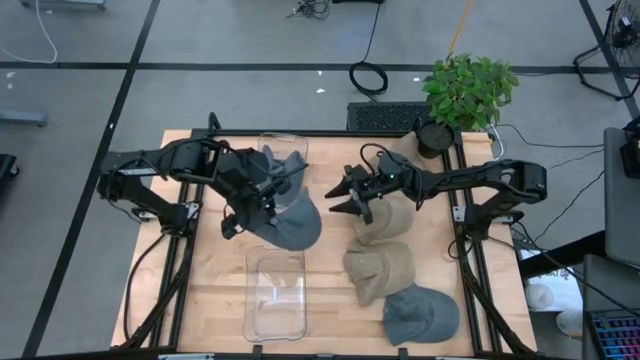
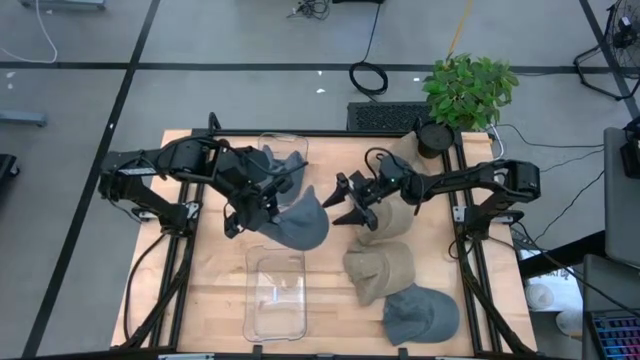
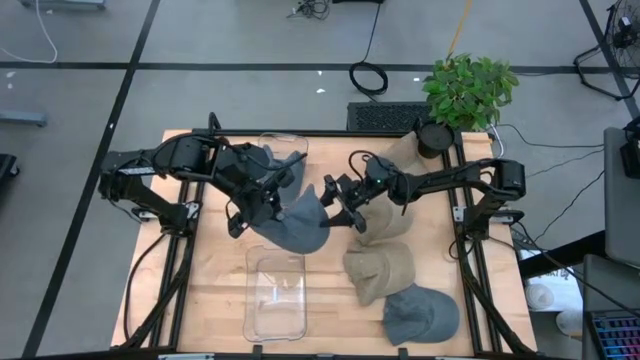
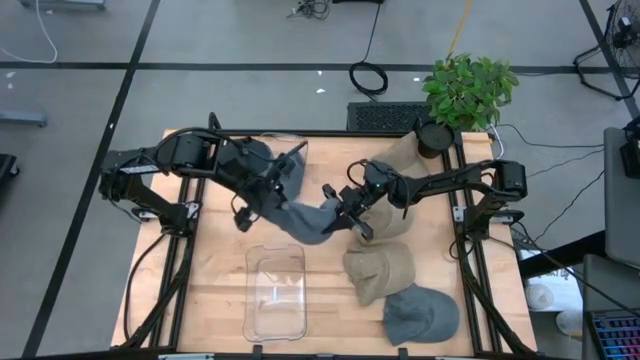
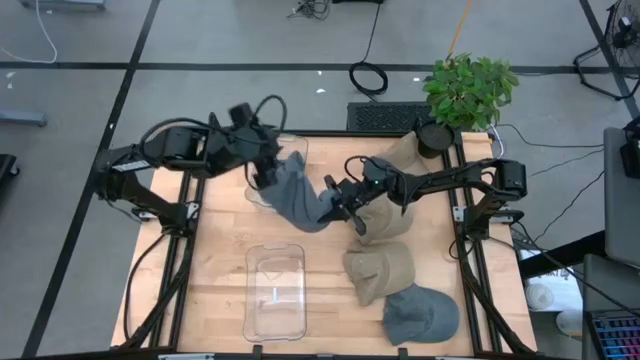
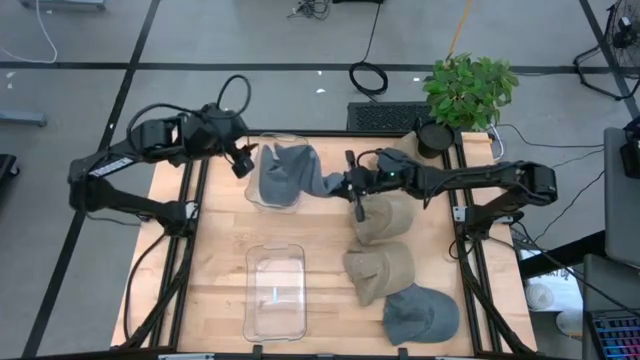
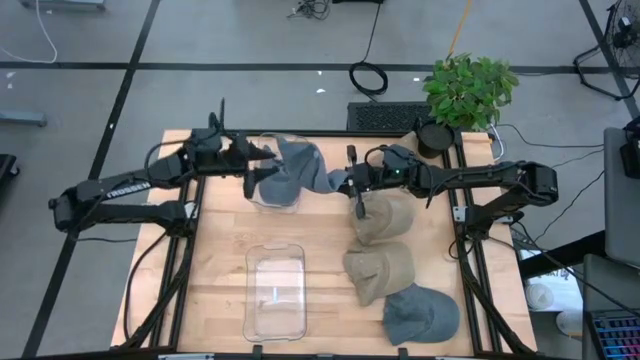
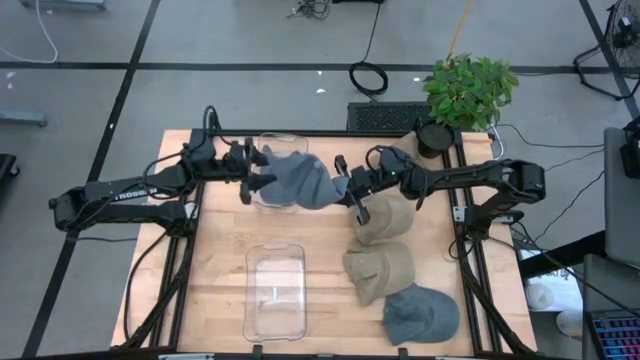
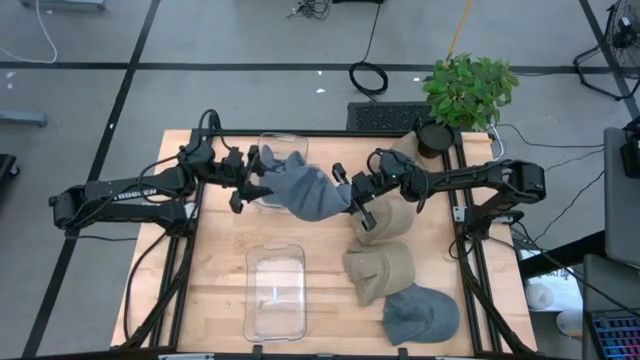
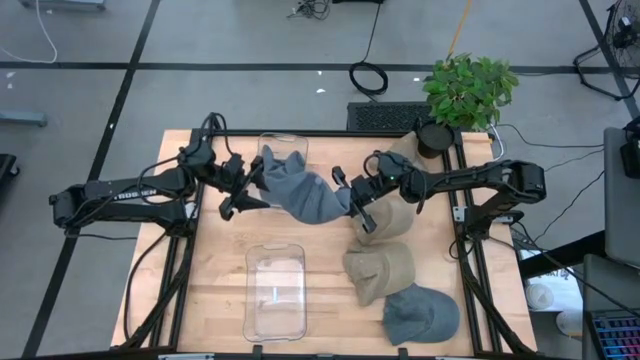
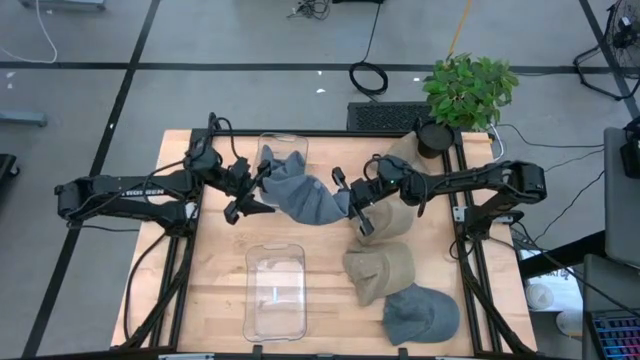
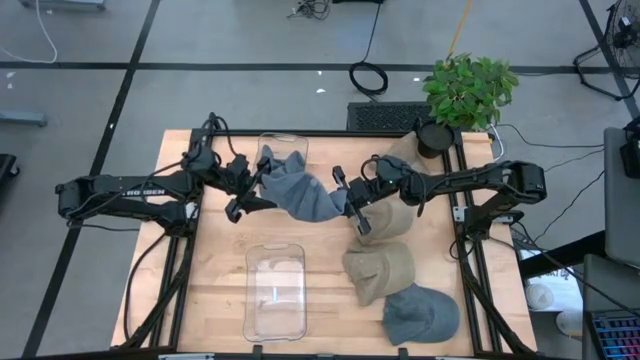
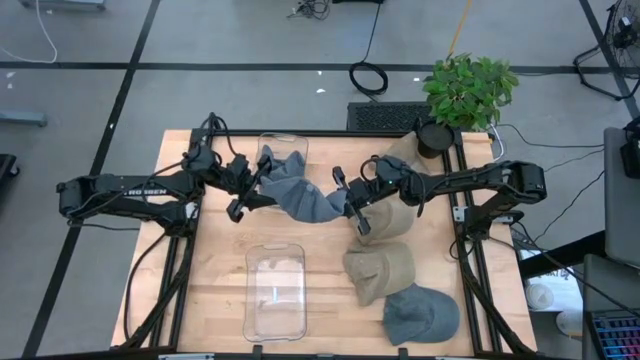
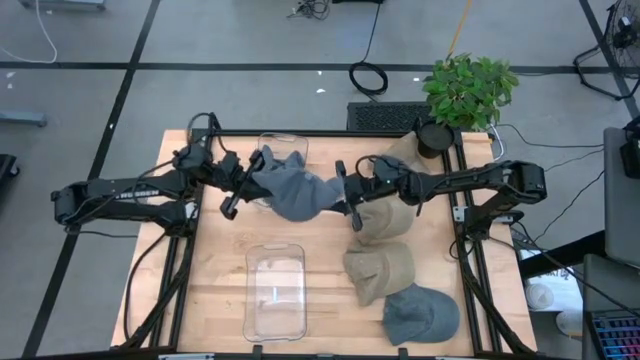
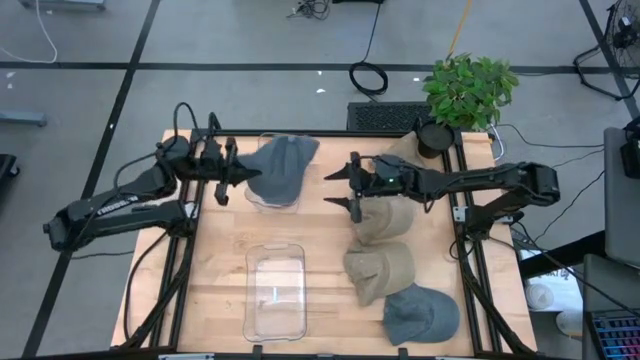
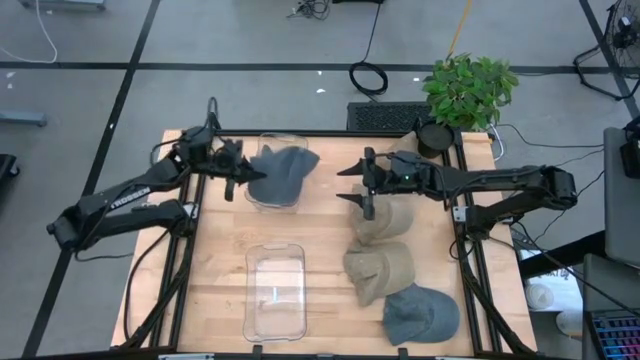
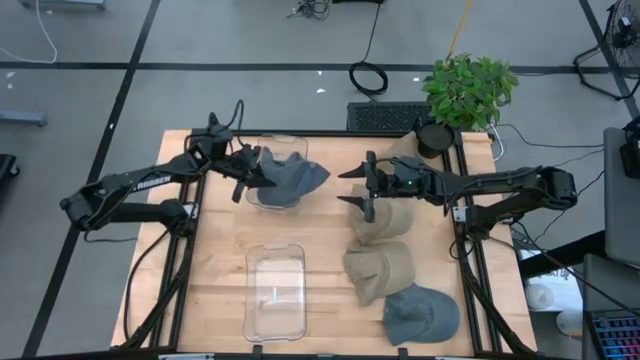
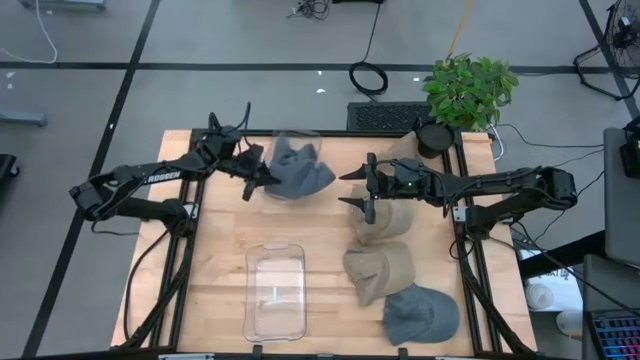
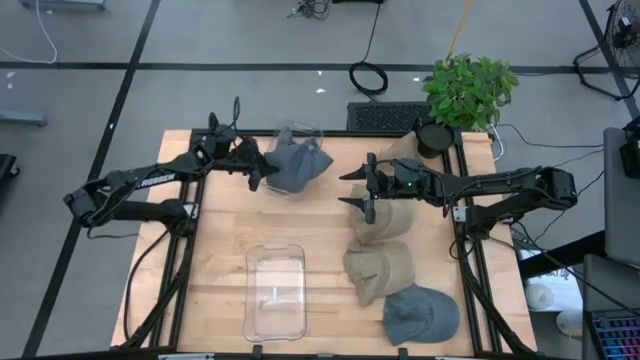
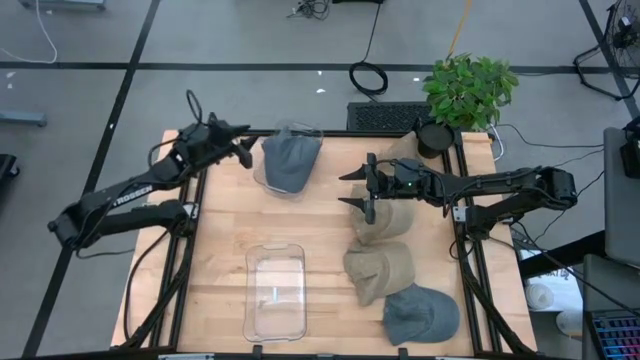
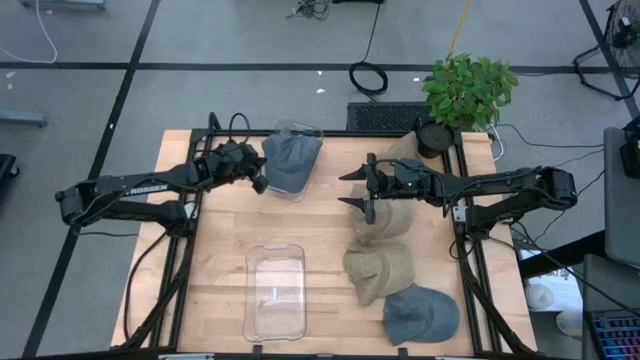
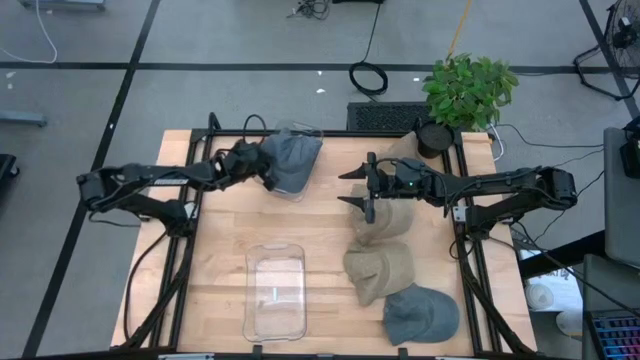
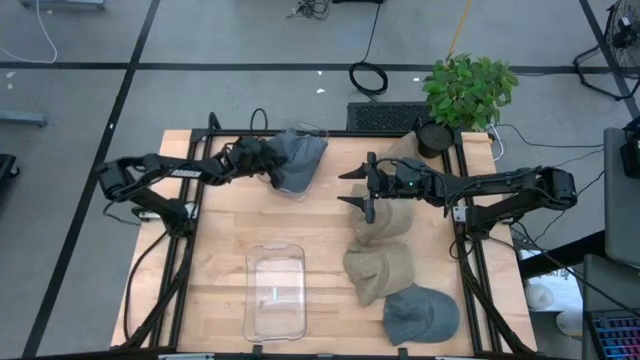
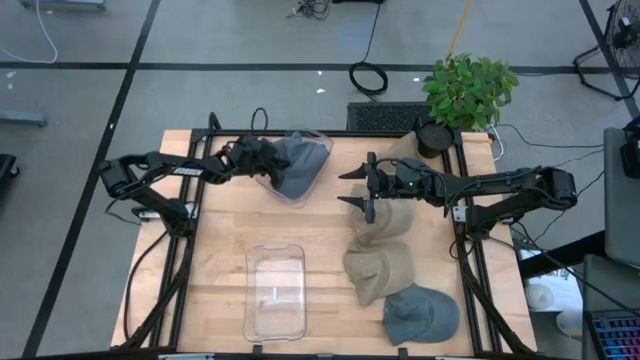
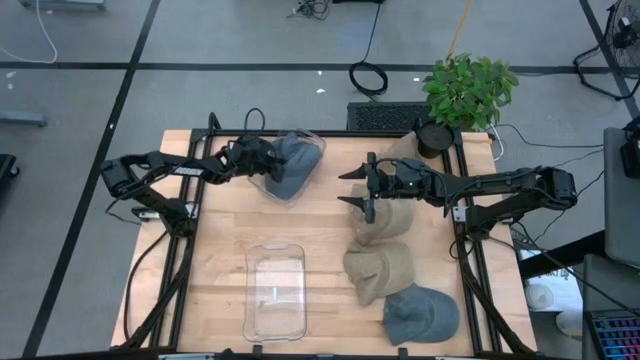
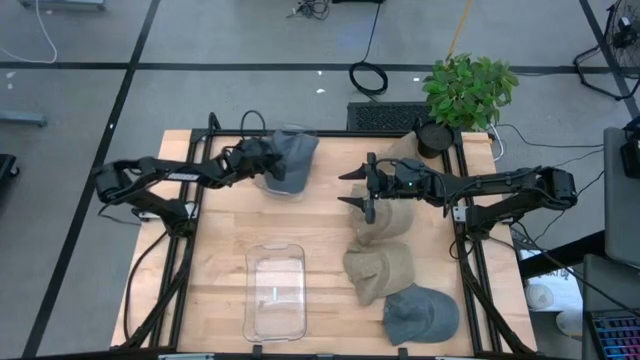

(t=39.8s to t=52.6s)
Task: Stack caps by color
Stack the top blue cap on the blue cap in the top transparent bin

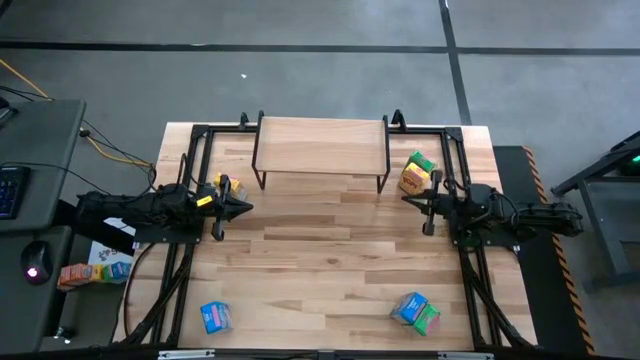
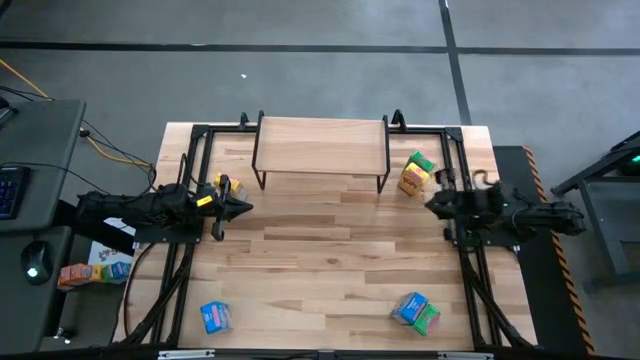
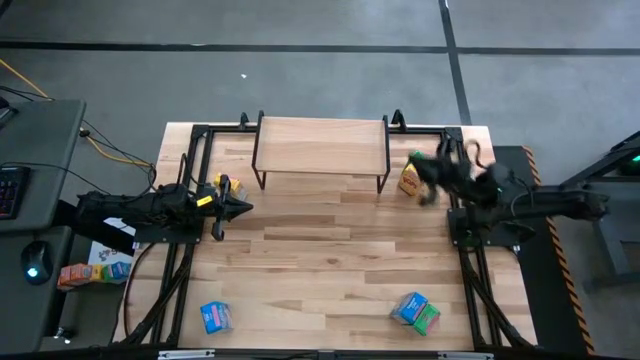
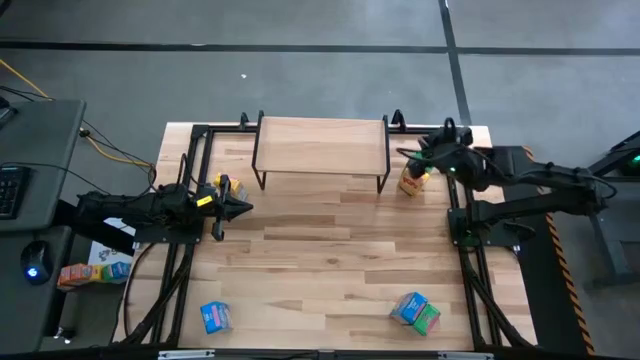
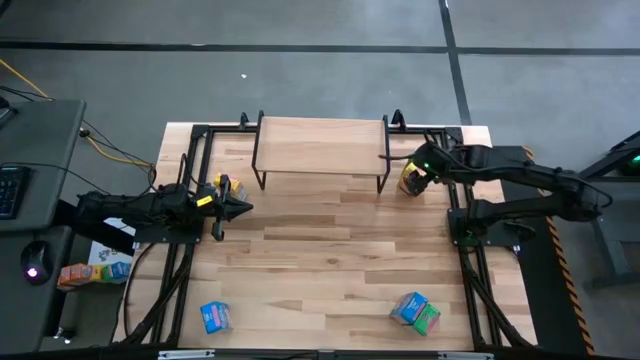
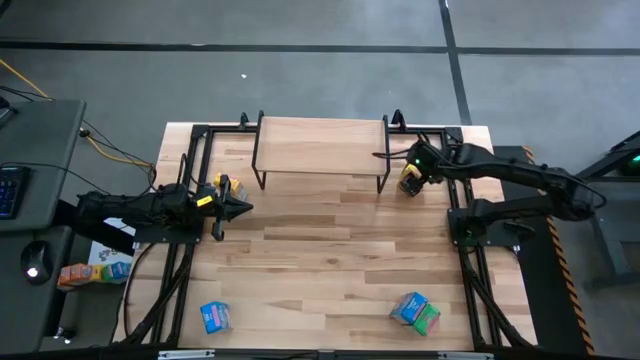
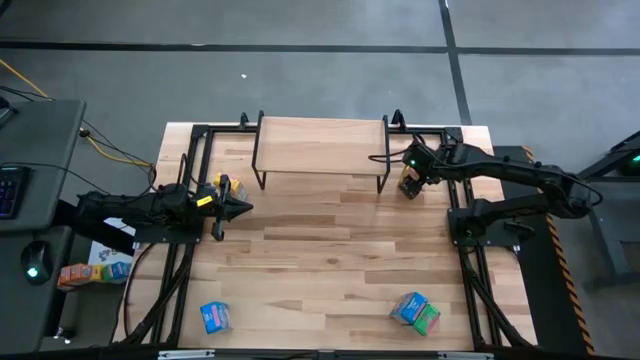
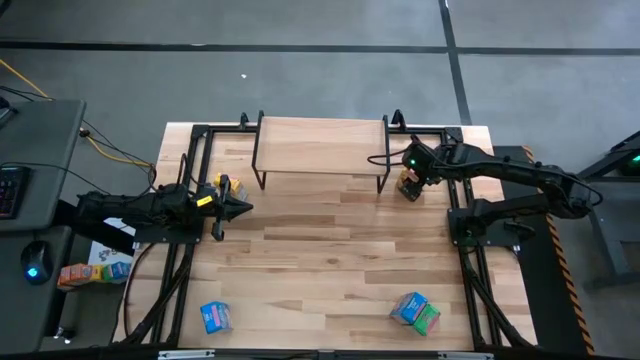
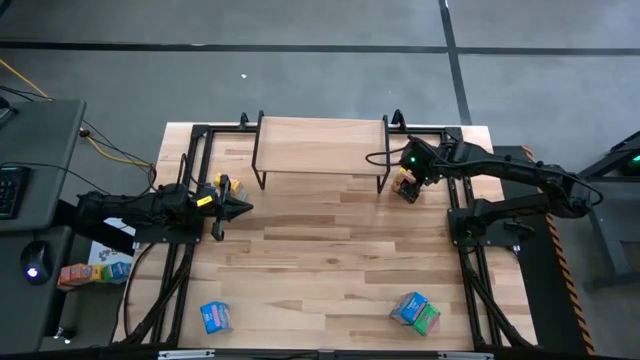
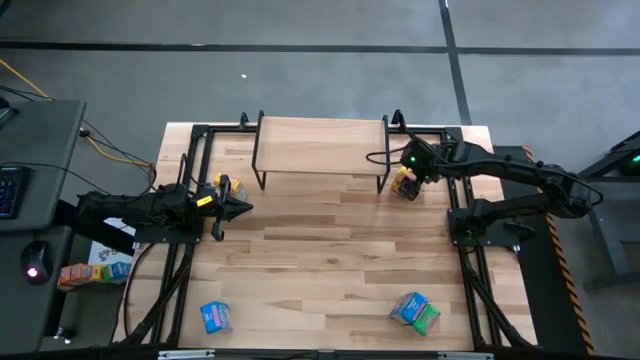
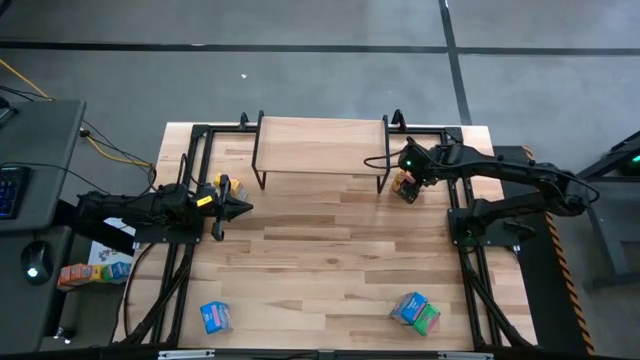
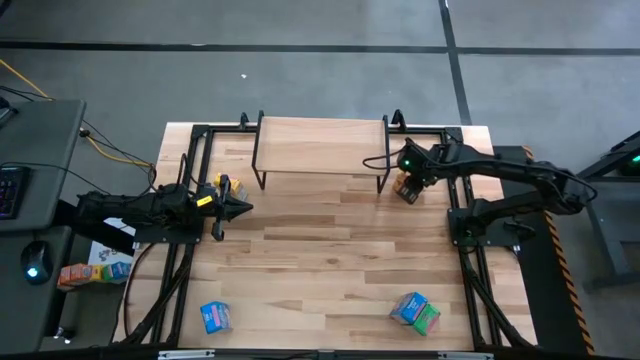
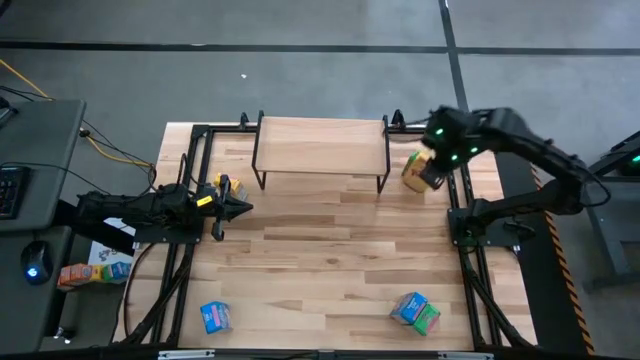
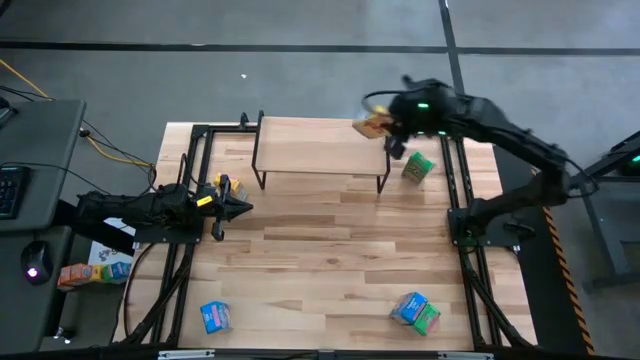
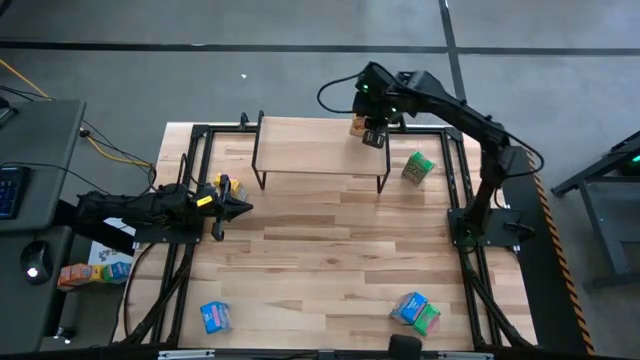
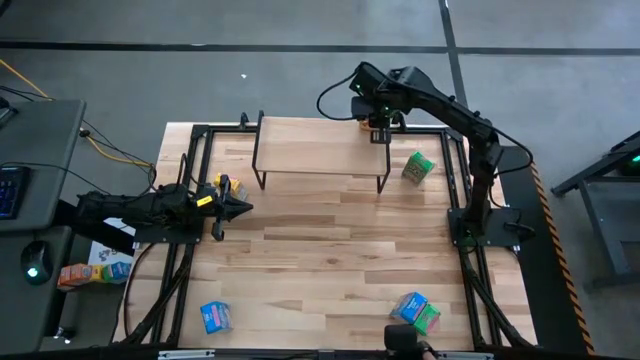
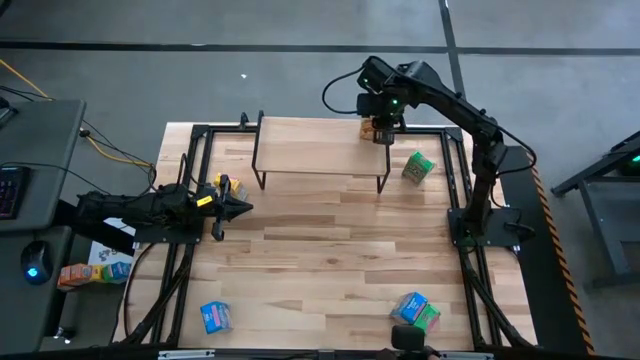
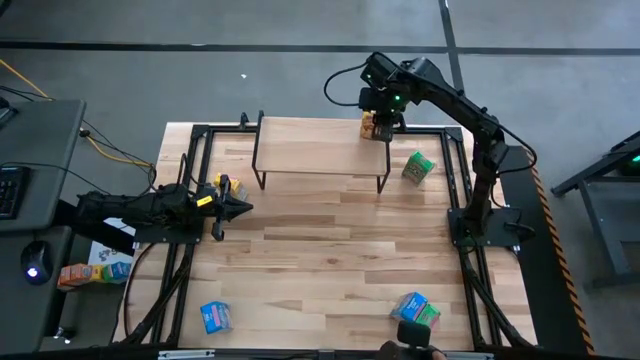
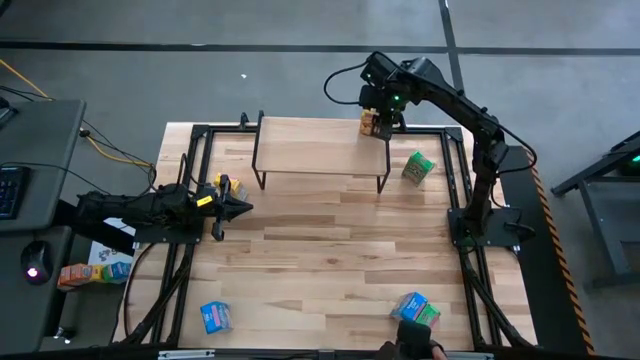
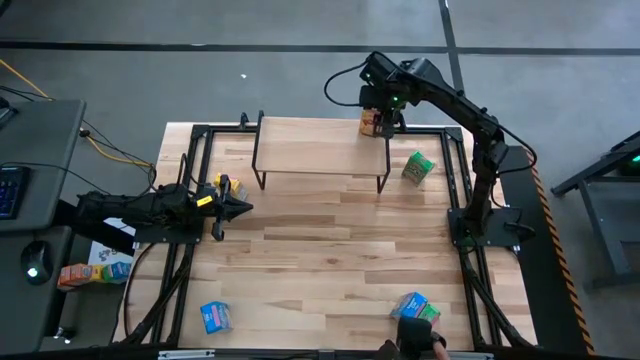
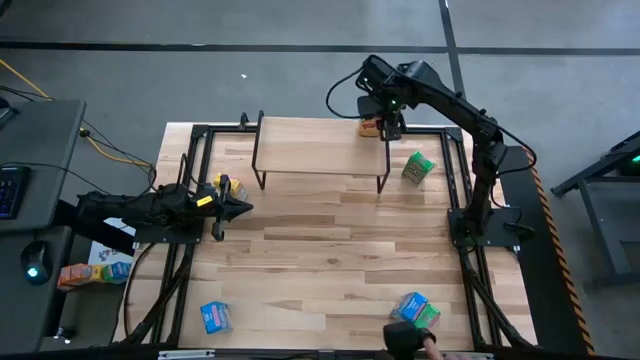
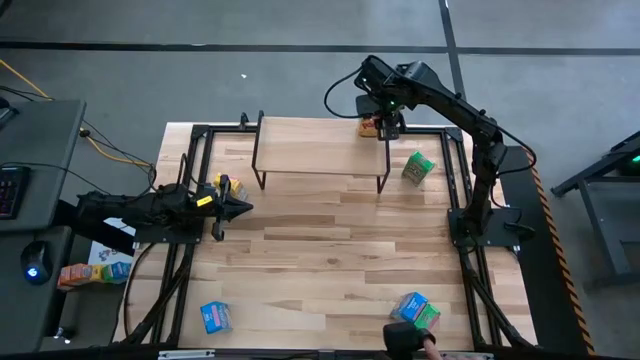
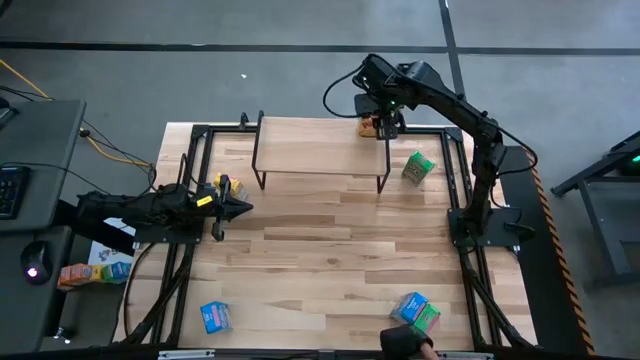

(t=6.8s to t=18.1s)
Task: Stack cereal on shelf
Put the right yellow cereal box on the shelf
